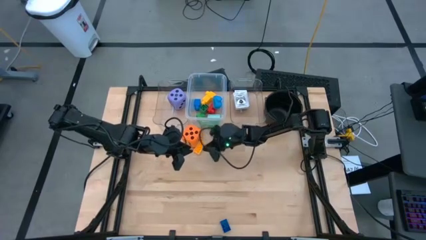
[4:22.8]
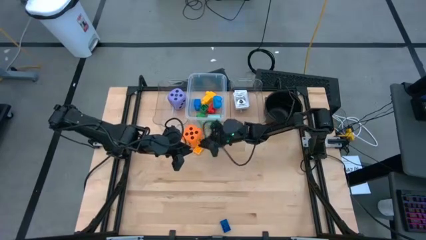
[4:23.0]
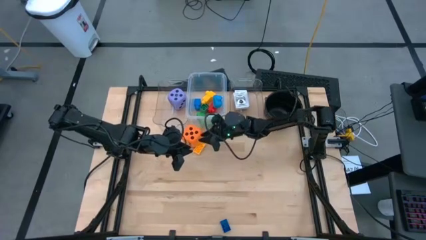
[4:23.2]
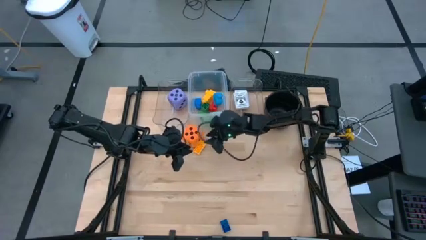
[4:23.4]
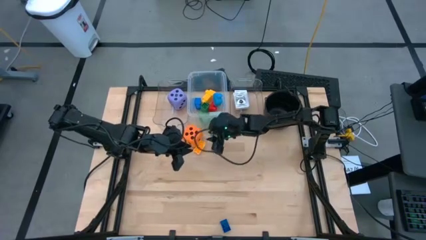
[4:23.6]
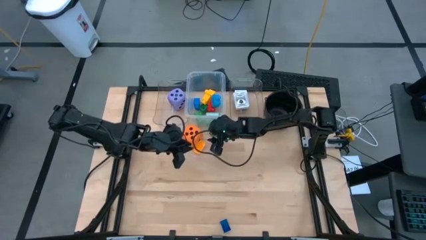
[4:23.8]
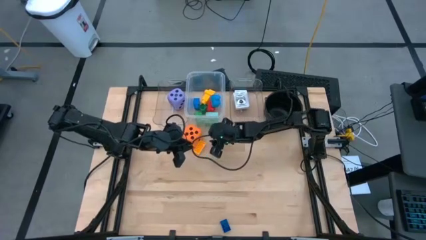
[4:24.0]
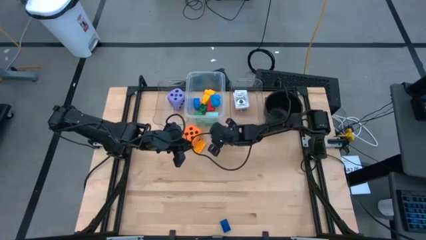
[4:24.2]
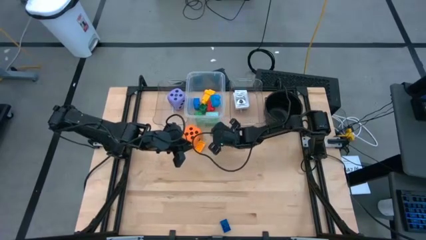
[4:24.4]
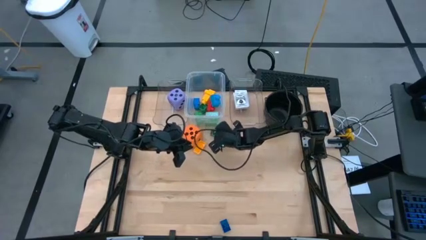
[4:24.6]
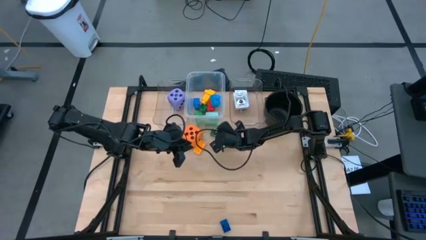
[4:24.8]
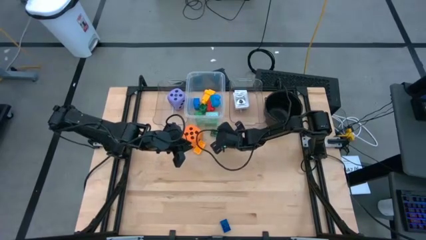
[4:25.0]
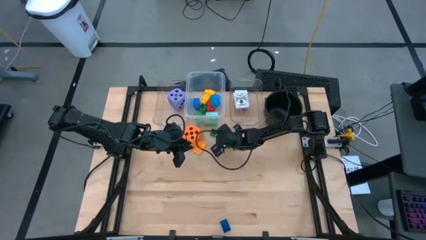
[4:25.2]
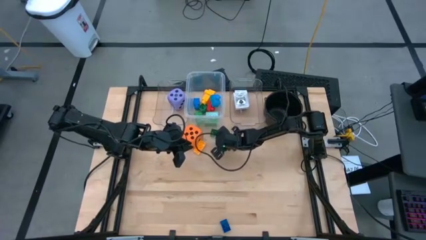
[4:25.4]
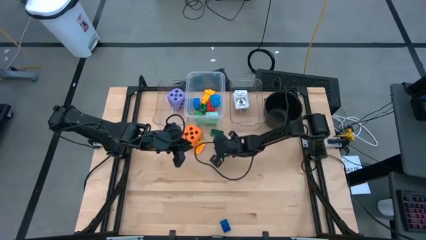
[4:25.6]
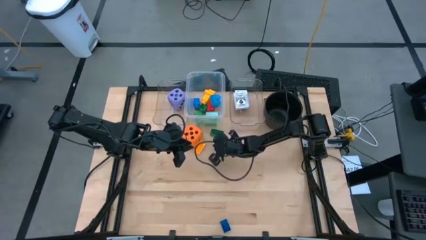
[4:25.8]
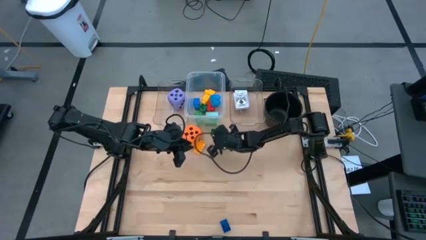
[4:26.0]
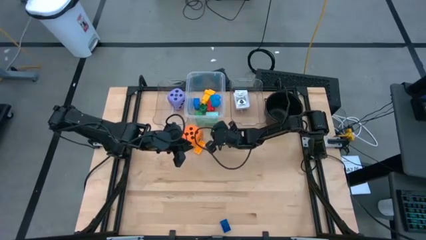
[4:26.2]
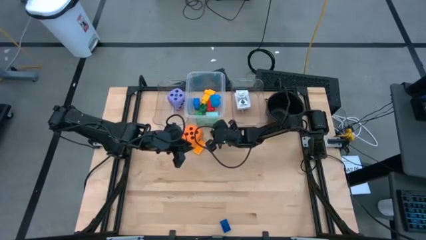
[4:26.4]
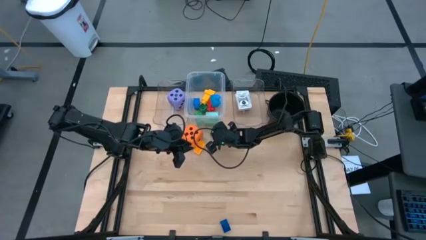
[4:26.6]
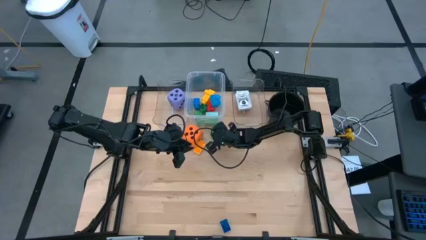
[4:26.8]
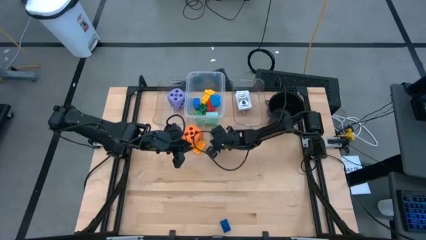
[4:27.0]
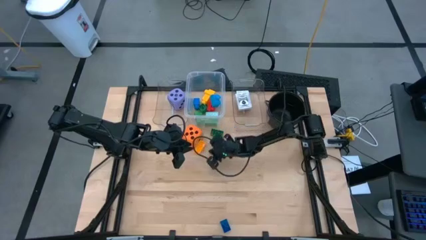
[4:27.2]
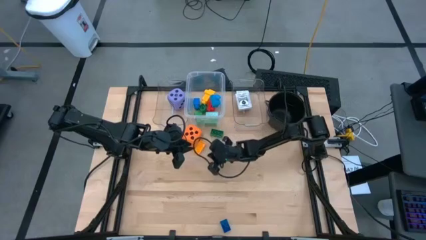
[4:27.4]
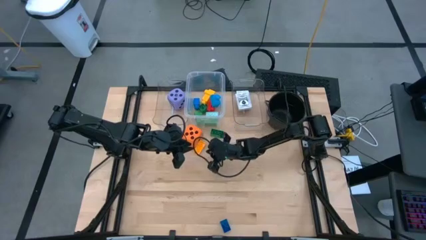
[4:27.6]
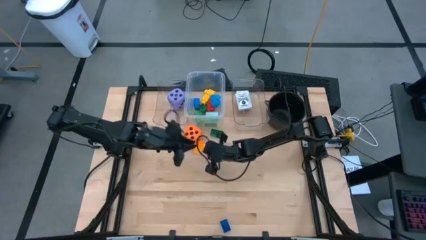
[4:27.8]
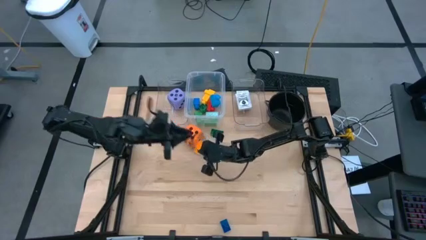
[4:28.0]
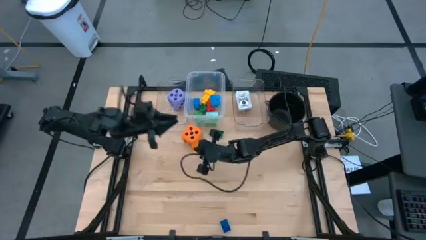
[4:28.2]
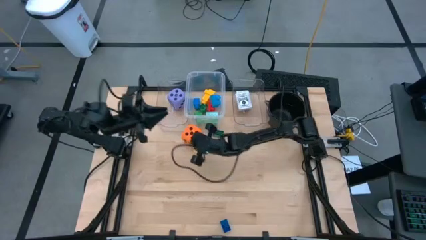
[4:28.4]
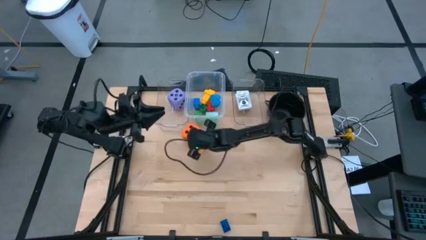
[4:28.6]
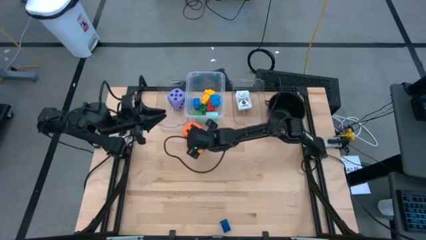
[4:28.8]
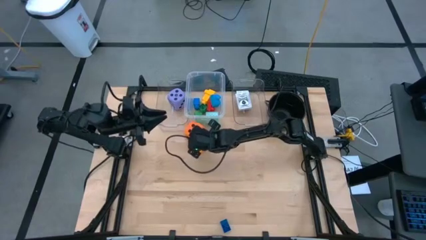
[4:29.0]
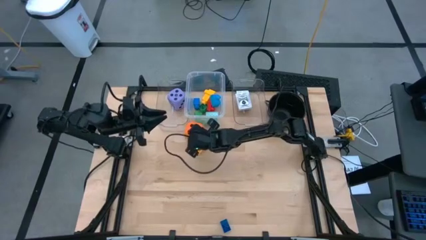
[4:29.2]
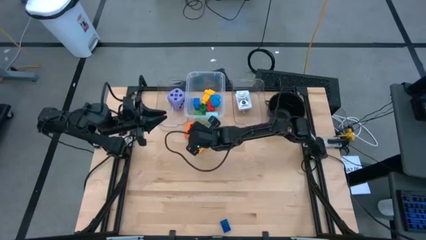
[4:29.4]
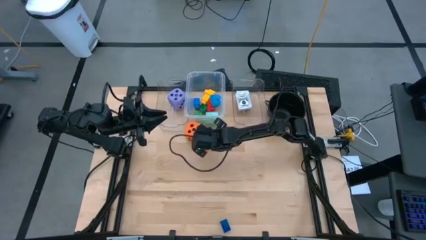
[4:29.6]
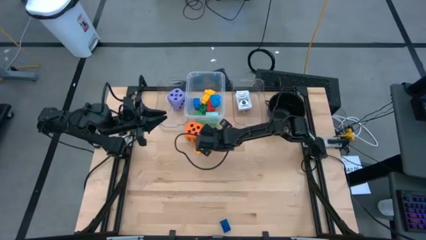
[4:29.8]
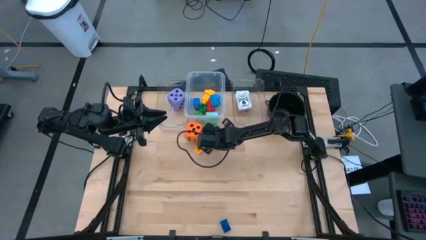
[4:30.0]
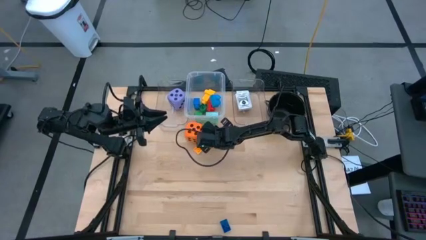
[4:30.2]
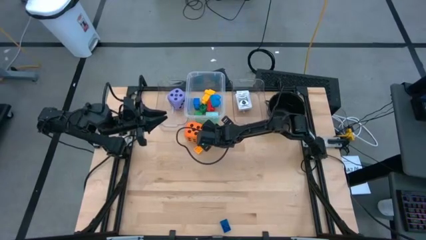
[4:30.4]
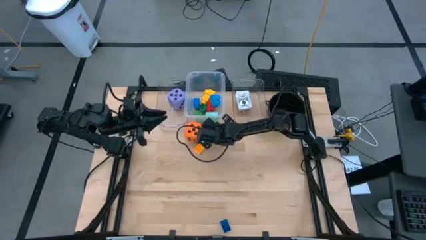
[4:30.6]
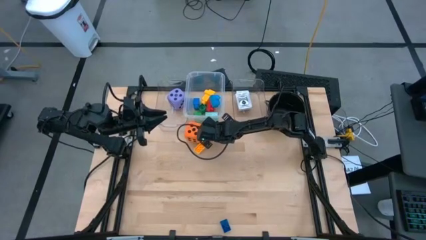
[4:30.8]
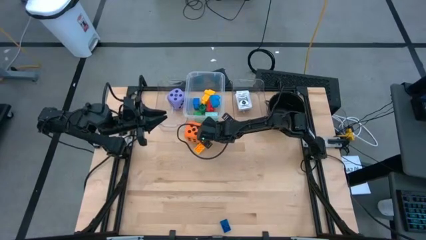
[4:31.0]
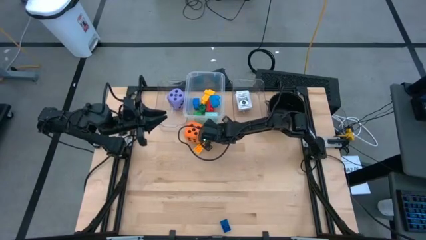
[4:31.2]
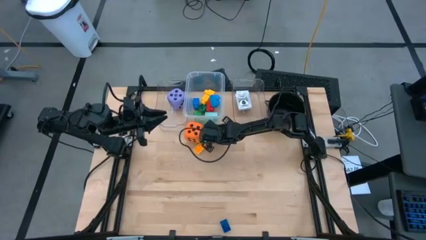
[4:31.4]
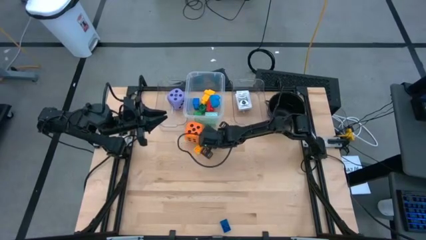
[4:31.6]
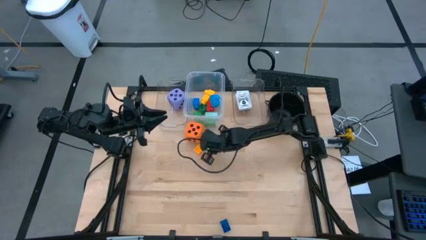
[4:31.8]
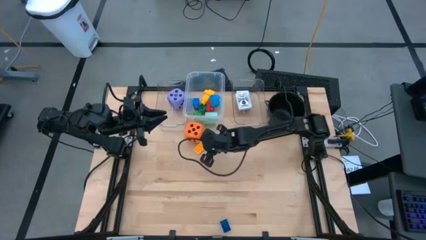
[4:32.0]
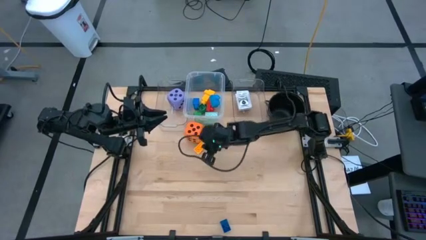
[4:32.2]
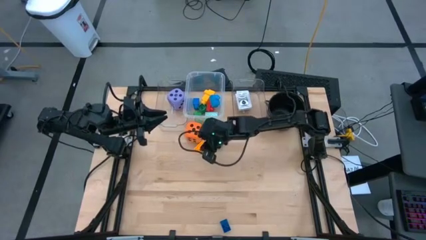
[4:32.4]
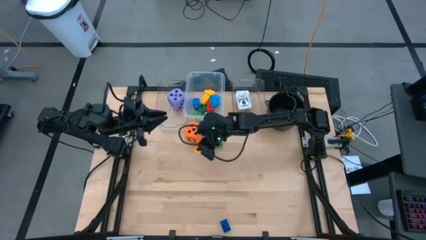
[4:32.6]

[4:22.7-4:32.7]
Task: Pick & Place Toys
Put the green eight stud game piece into the middle transparent bin

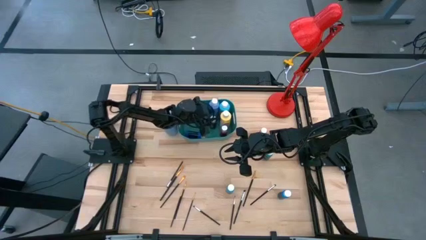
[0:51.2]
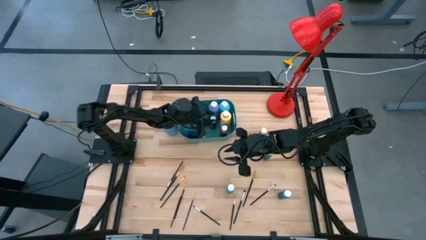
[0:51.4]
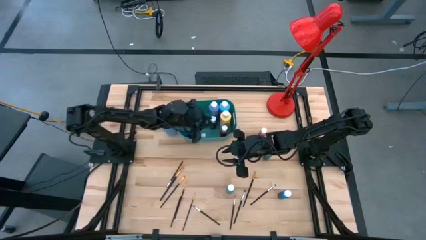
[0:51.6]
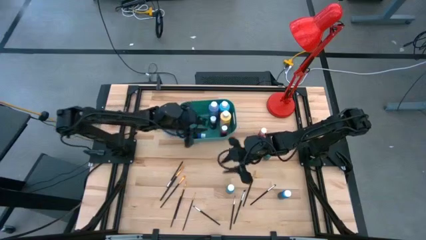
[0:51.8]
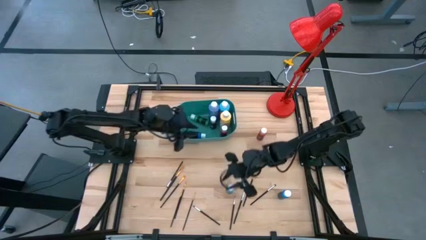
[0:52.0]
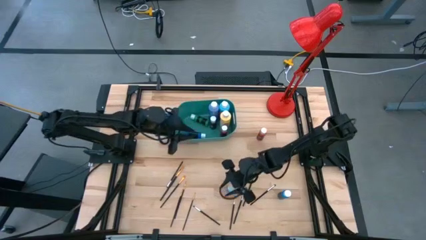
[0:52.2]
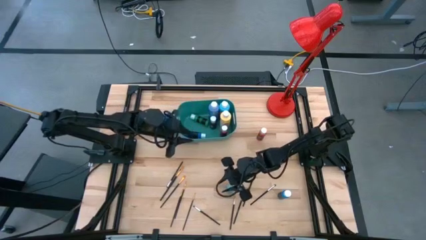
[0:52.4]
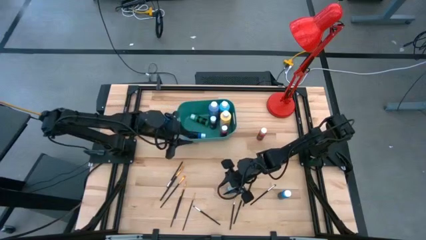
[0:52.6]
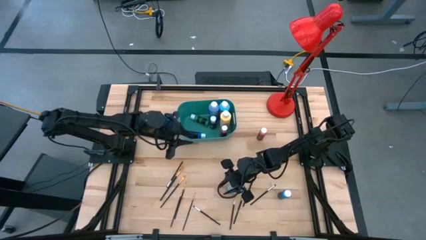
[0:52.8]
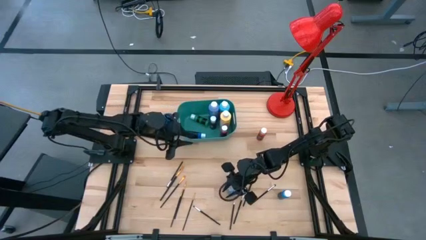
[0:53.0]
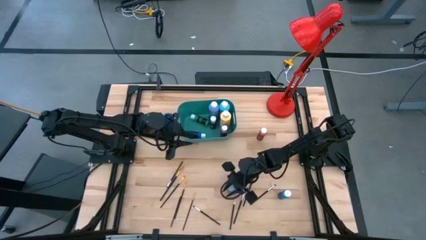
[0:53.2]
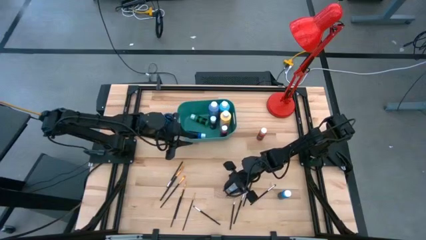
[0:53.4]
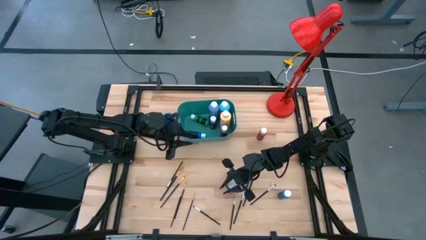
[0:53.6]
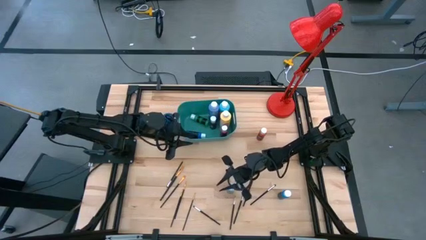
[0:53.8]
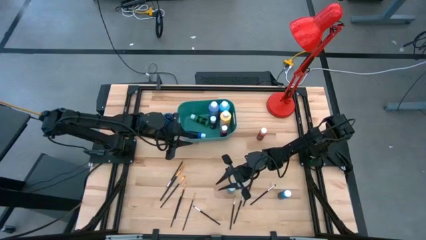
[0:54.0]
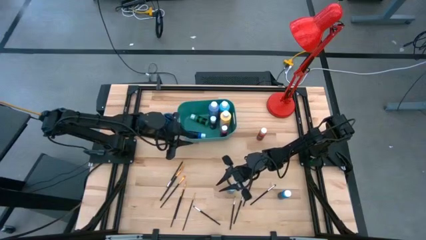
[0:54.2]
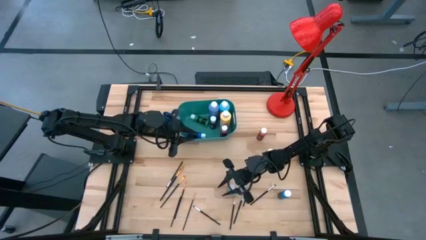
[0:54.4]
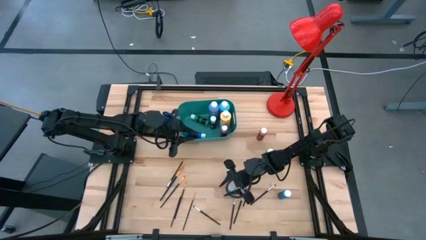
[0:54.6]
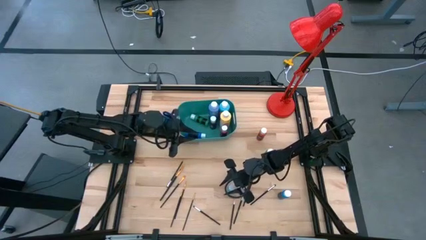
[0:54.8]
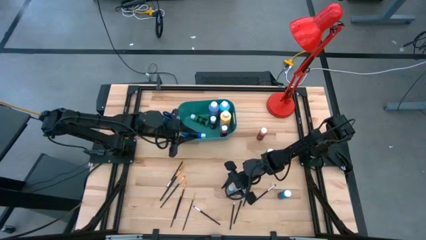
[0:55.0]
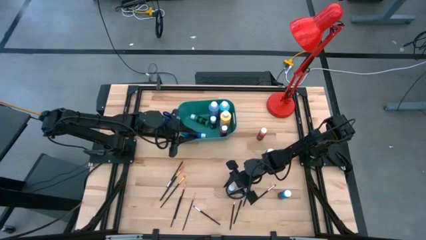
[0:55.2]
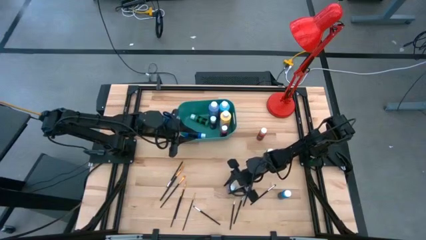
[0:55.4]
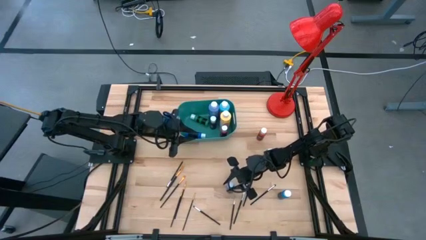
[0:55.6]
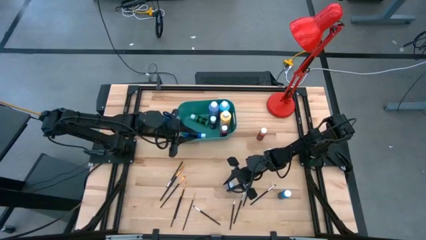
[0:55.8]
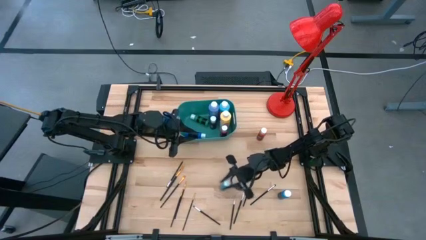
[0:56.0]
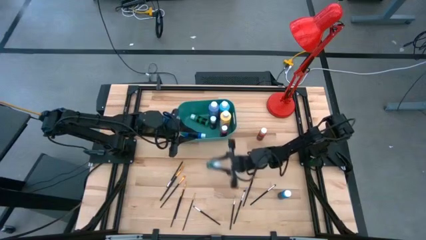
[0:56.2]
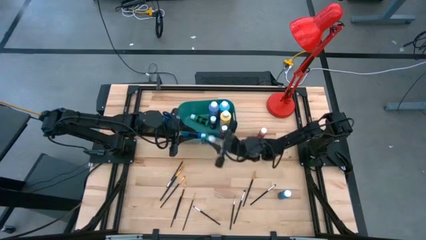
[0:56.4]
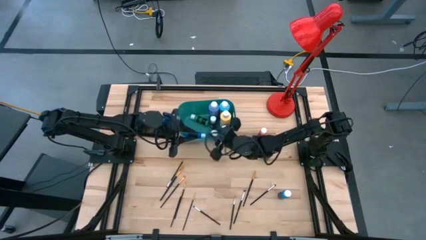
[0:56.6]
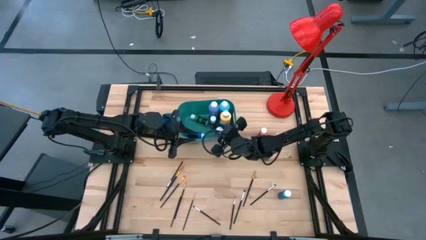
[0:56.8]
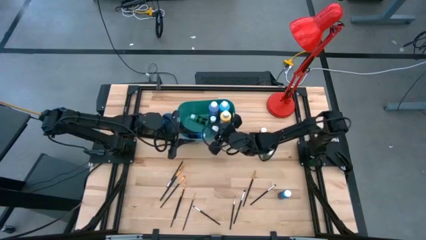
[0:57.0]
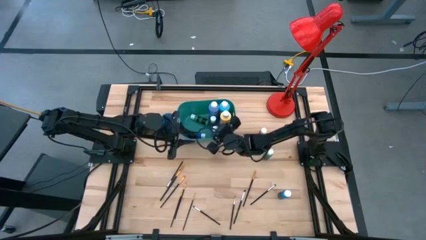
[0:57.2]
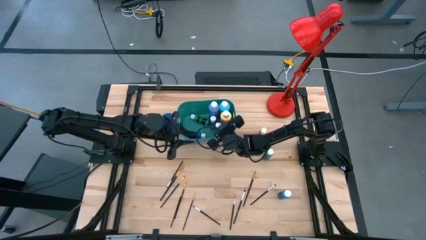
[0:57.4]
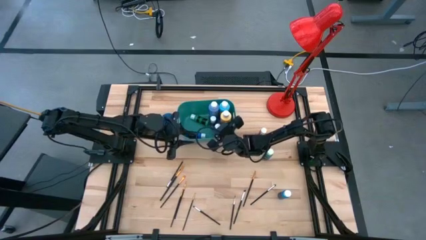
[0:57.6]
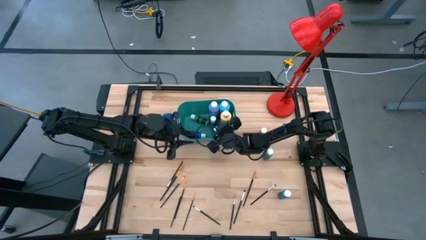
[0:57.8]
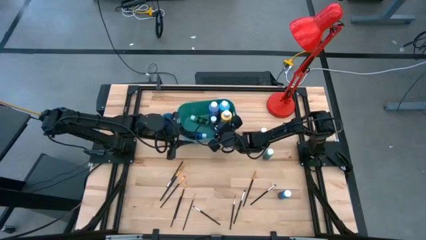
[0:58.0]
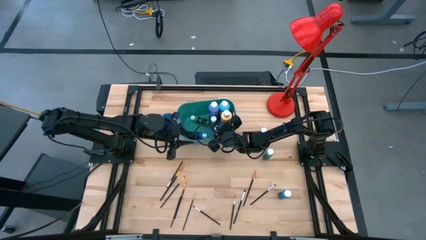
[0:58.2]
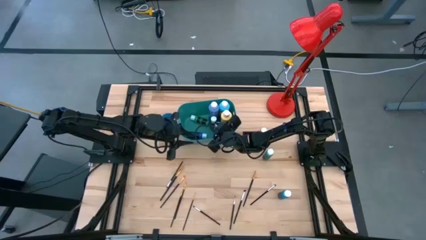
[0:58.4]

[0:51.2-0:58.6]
Task: Pick & Place Paint Supplies
Put the small light blue paint bottle into the green bin
